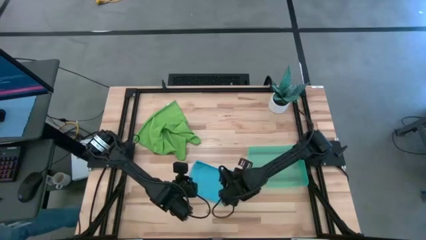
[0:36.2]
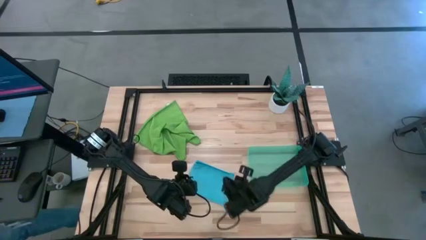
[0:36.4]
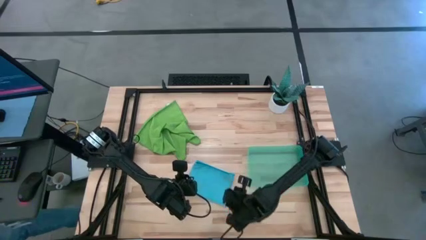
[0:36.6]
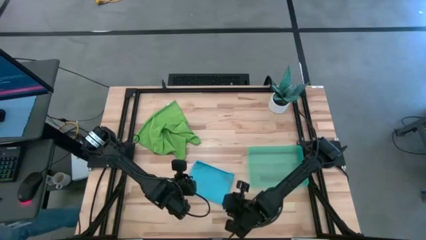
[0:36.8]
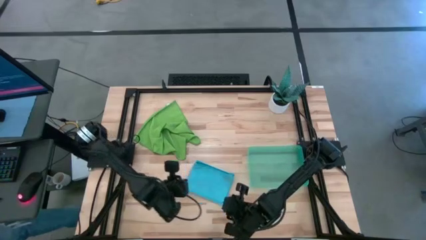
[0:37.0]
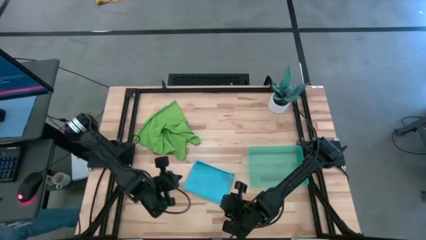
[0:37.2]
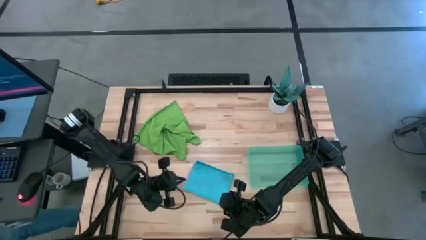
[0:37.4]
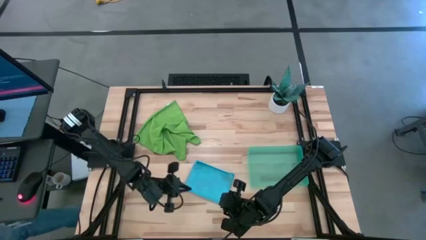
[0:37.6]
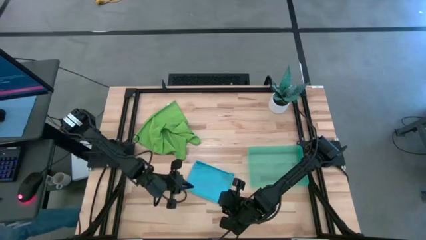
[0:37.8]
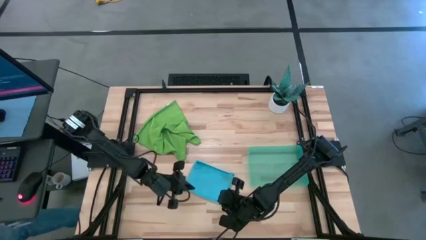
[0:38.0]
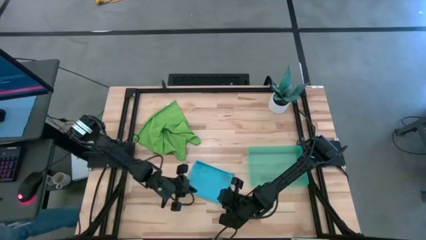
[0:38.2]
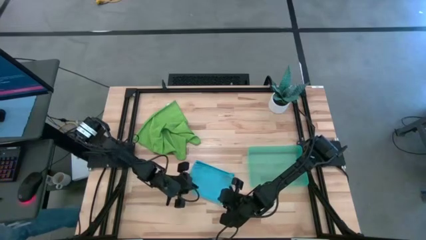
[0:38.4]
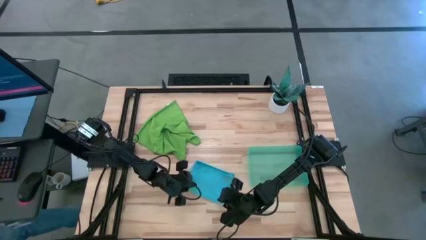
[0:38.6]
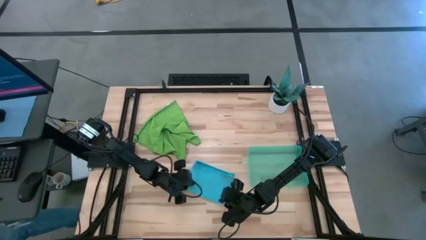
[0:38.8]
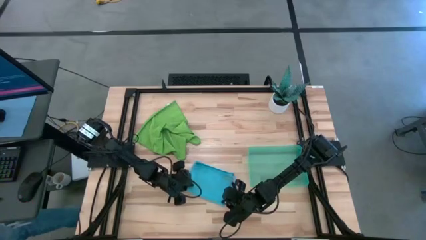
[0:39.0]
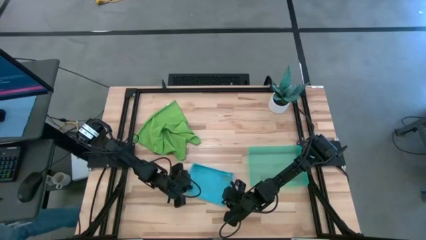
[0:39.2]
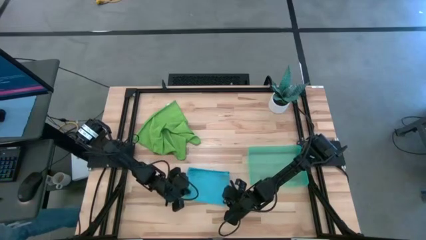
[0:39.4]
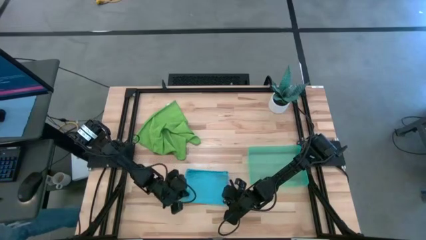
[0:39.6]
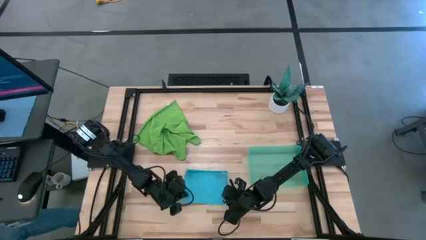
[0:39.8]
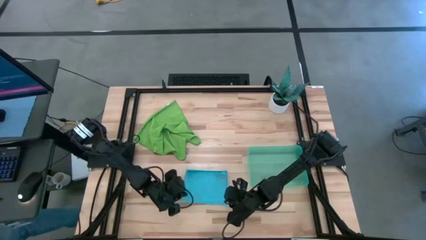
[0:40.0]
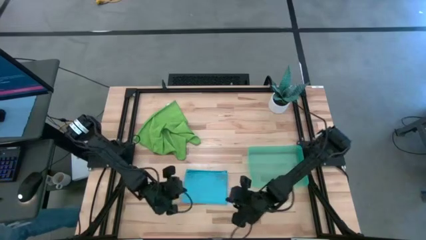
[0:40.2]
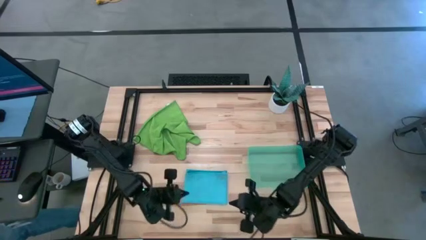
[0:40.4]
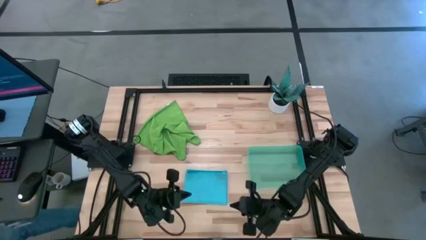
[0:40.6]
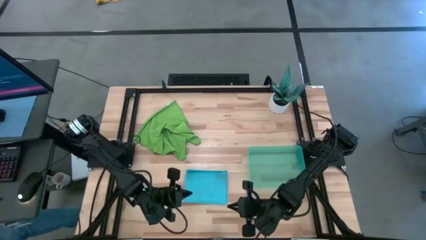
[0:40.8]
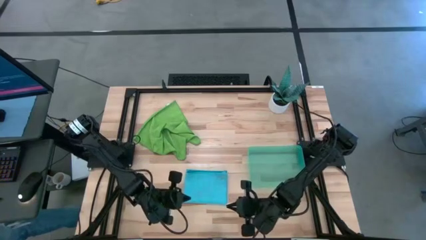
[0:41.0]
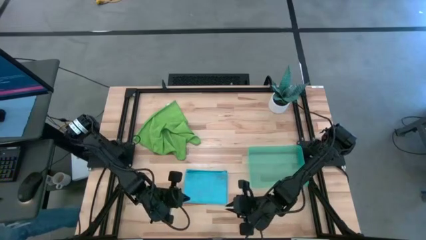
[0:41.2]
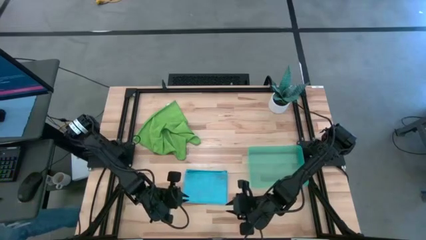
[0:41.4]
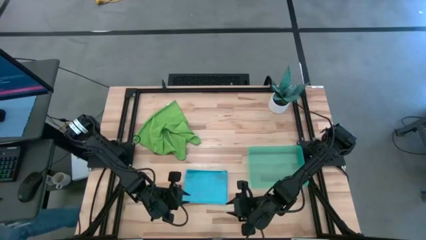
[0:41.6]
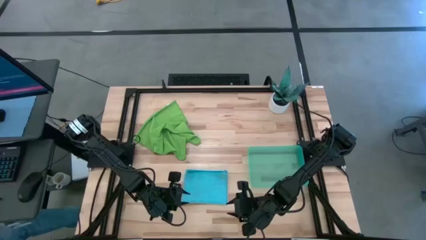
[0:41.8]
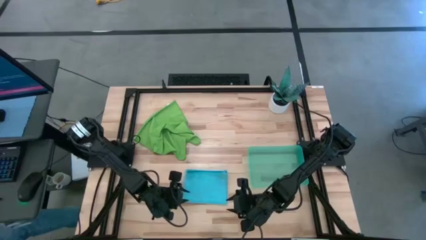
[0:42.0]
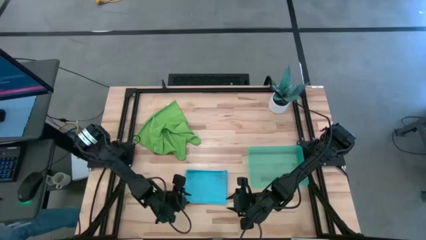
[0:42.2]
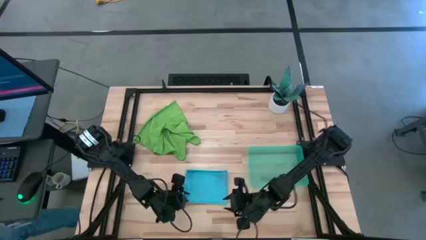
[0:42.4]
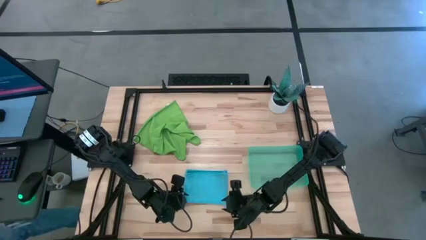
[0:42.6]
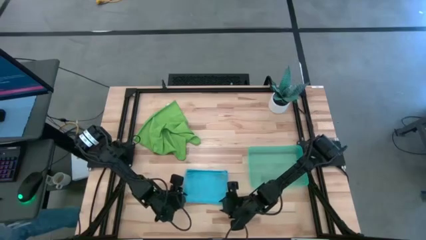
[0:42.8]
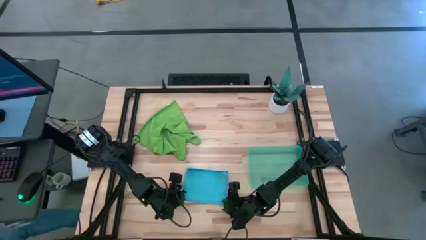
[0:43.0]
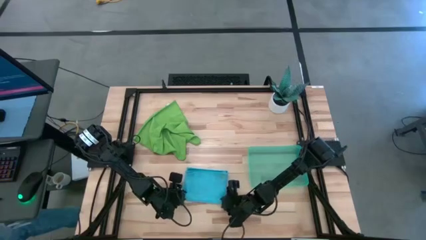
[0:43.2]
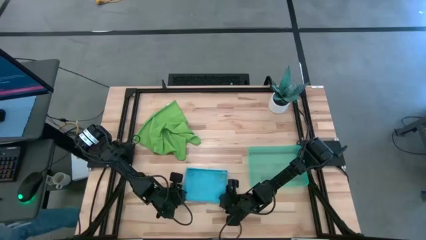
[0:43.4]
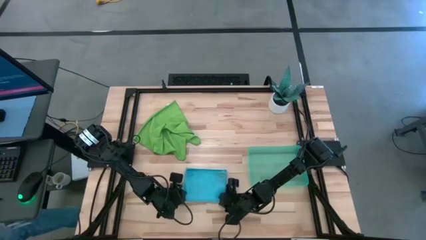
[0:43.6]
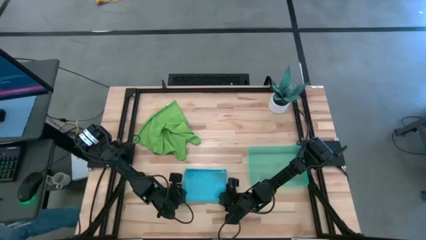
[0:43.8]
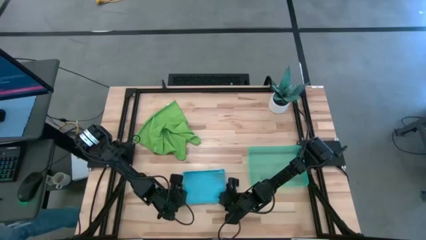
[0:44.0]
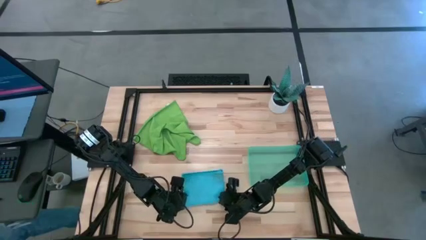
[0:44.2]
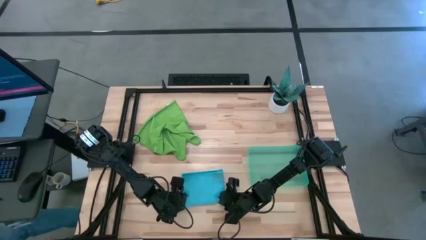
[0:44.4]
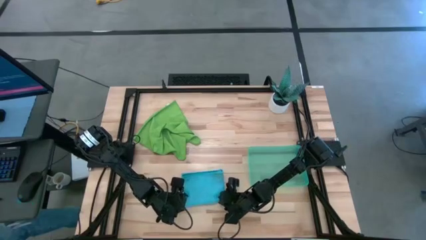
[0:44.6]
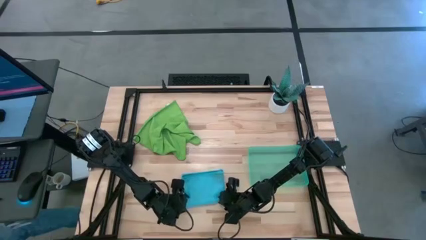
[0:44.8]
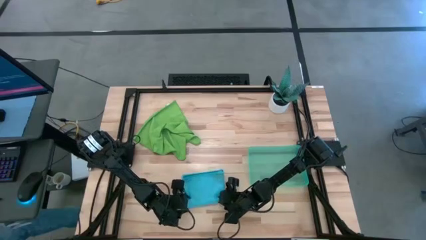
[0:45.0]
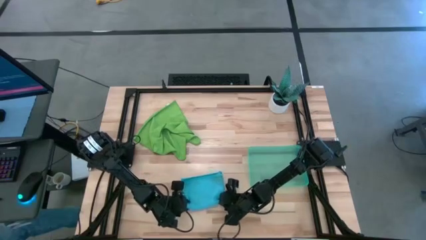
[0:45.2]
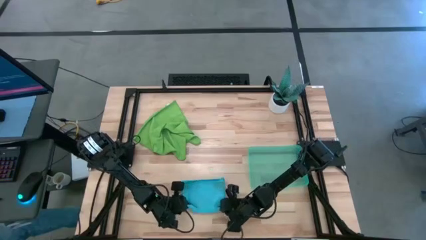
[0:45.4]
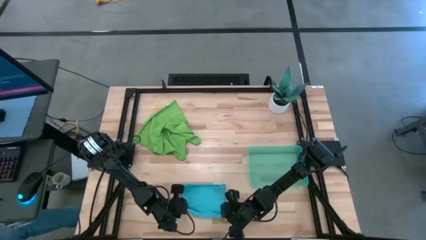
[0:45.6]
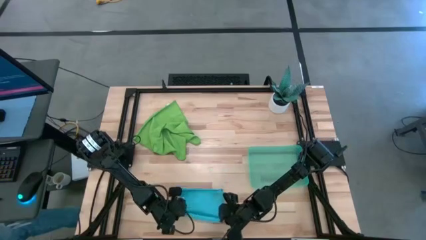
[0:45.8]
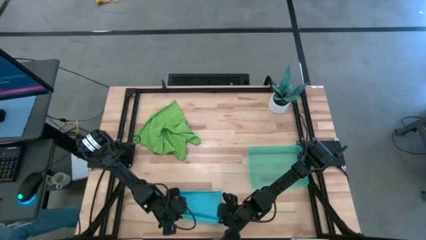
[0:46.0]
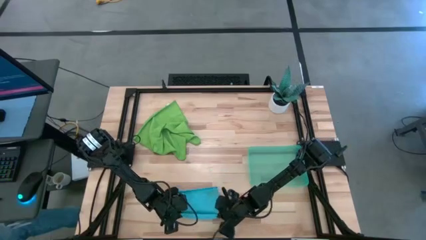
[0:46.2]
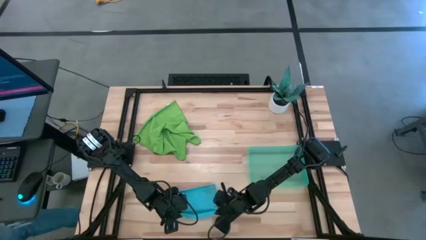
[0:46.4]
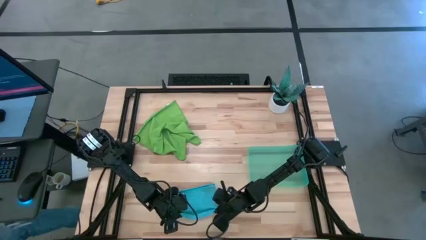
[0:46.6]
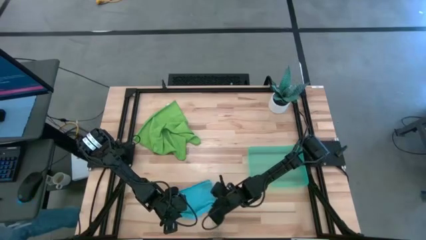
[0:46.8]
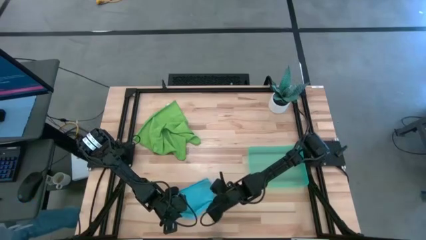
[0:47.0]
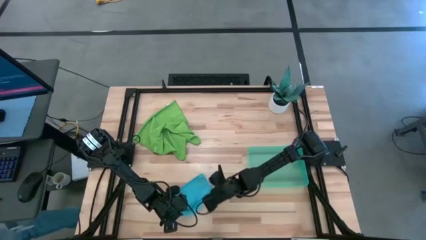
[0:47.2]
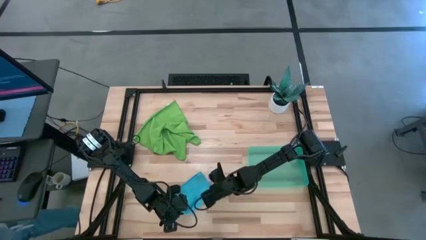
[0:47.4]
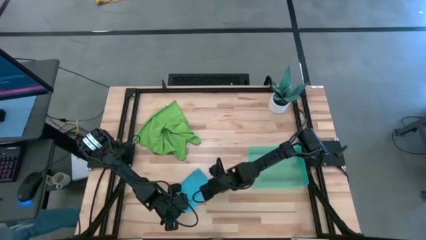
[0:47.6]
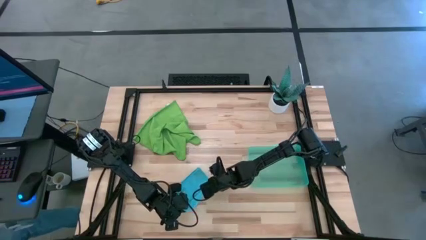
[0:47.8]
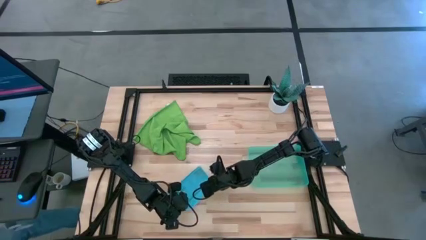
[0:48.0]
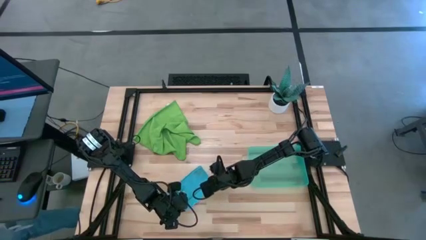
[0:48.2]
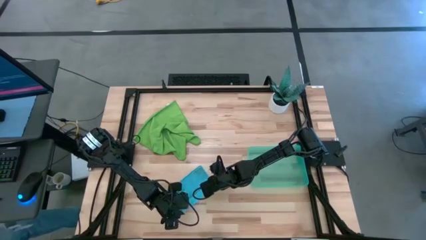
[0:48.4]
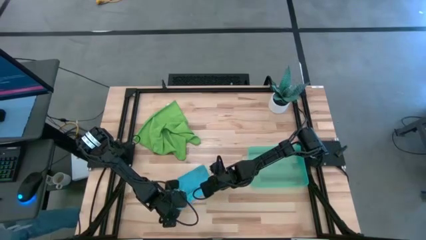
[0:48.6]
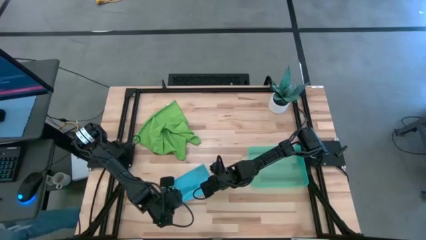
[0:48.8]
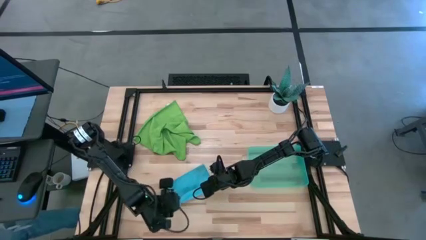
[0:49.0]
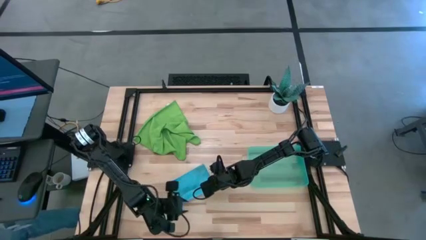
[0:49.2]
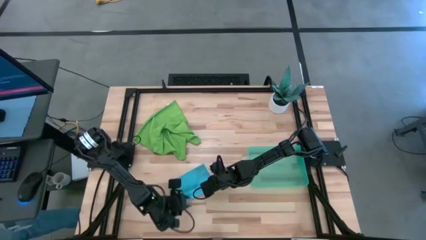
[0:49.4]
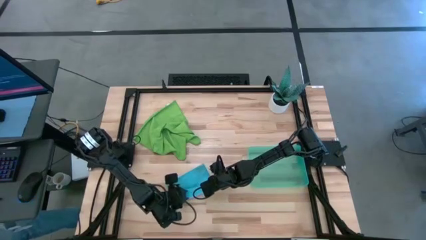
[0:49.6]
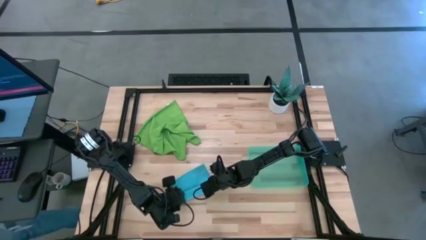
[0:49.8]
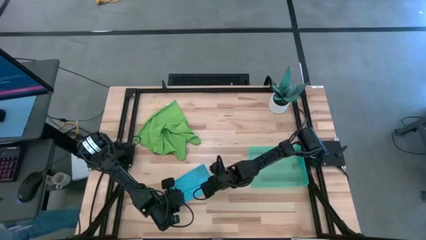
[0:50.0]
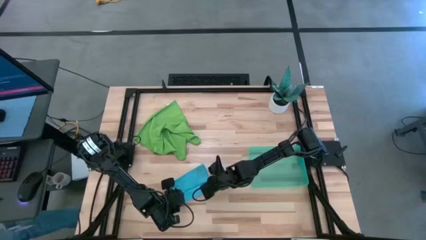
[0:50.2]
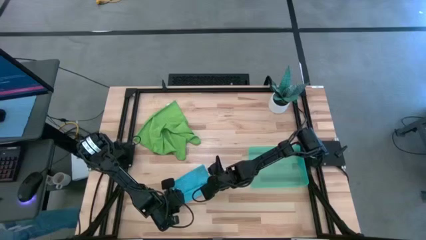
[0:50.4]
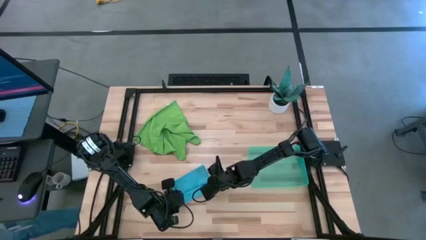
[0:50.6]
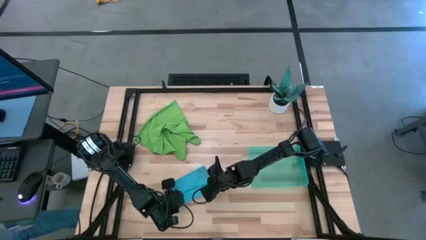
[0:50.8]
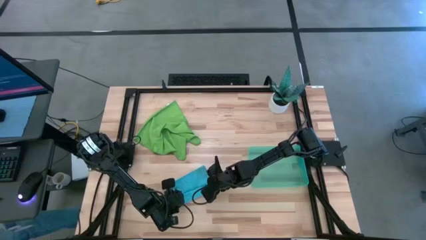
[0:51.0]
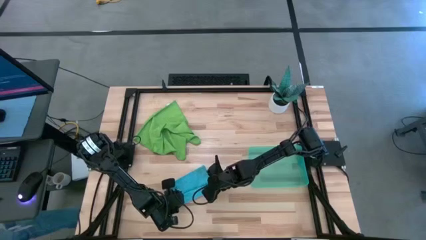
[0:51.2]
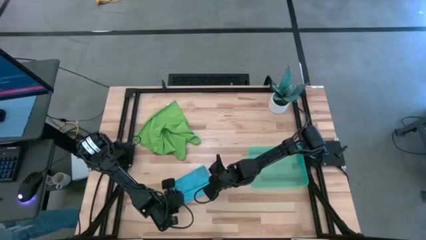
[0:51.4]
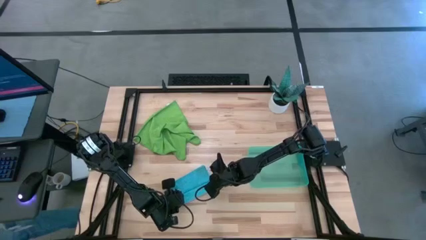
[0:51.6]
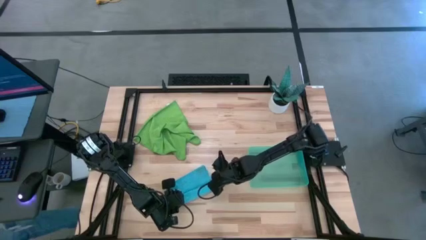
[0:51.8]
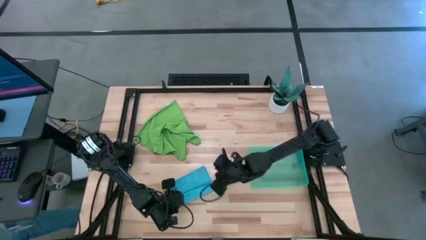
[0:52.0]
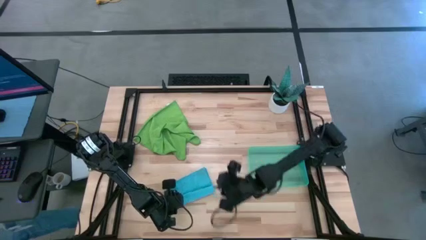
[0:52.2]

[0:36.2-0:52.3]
Task: Roll microfiber towels into tight, uniform cylinder then place into a basket
Roll the blue microfiber towel
